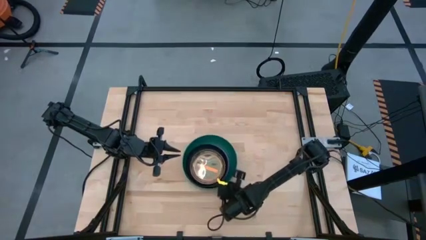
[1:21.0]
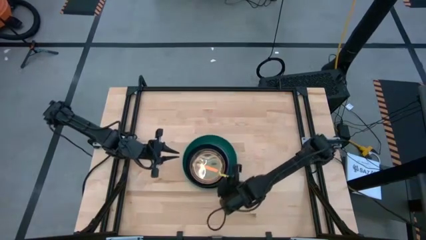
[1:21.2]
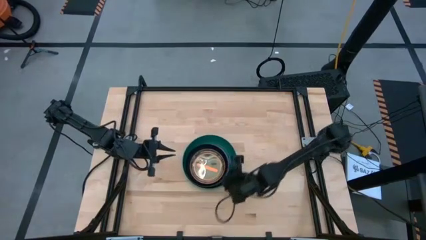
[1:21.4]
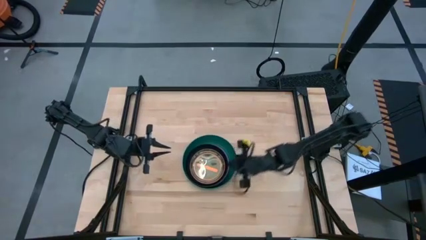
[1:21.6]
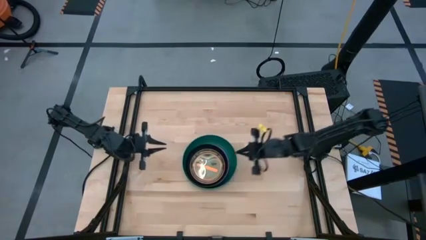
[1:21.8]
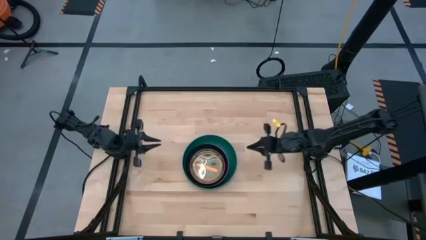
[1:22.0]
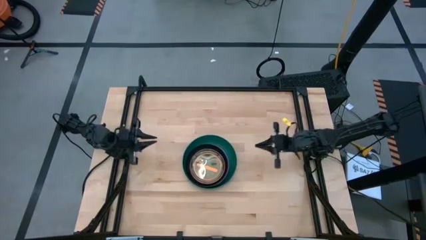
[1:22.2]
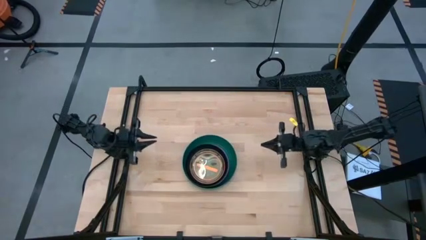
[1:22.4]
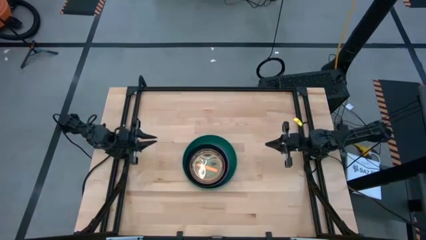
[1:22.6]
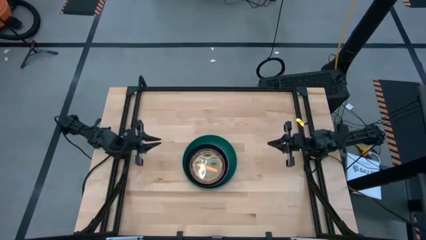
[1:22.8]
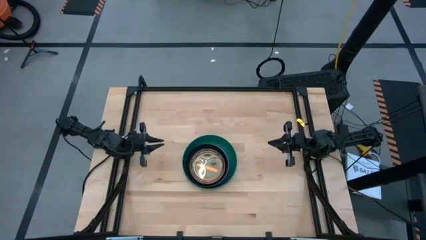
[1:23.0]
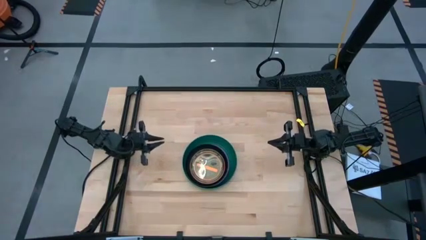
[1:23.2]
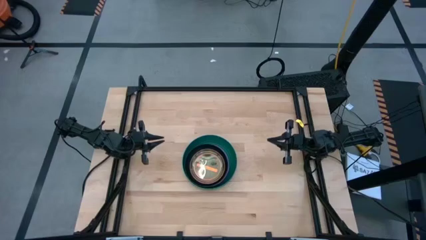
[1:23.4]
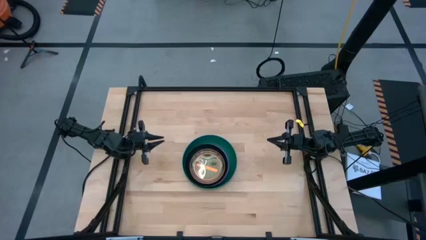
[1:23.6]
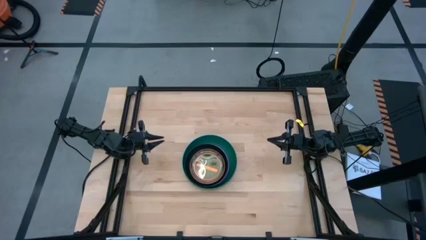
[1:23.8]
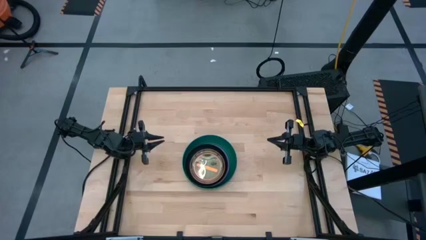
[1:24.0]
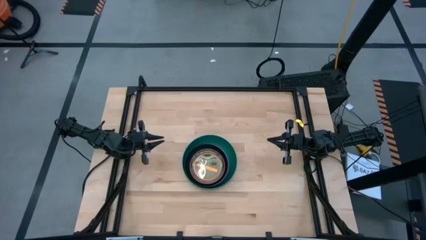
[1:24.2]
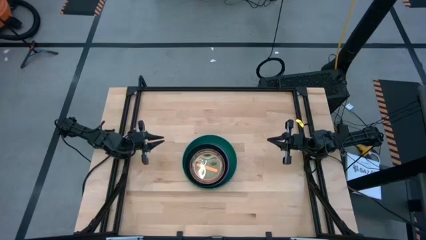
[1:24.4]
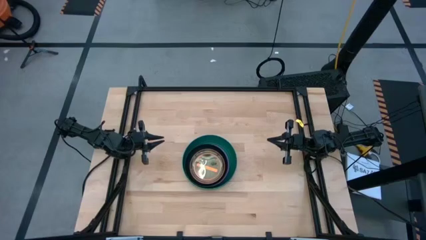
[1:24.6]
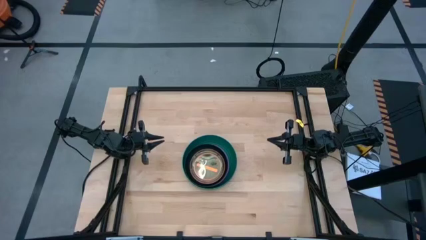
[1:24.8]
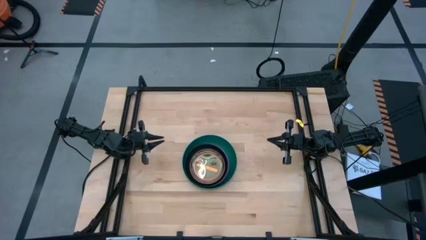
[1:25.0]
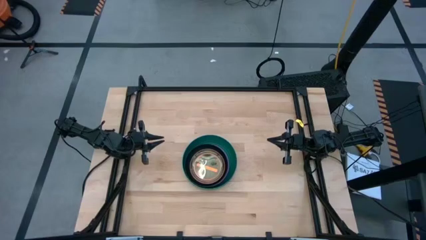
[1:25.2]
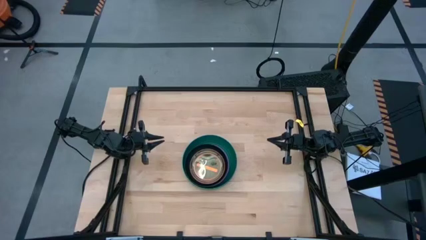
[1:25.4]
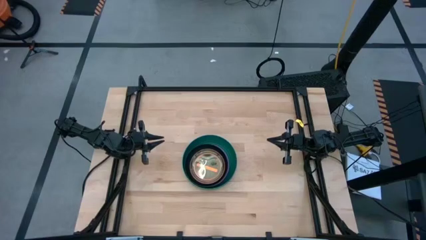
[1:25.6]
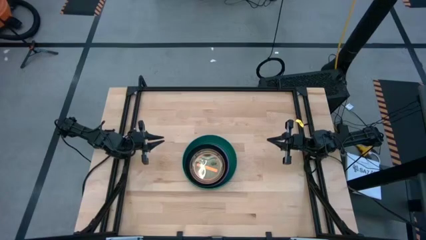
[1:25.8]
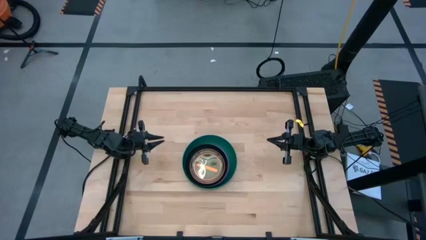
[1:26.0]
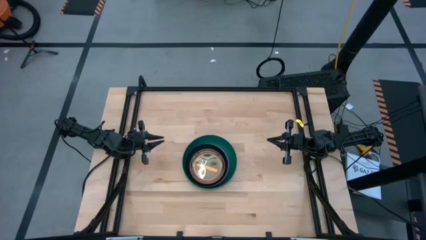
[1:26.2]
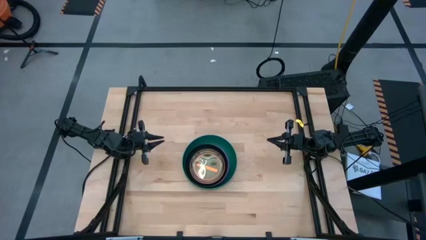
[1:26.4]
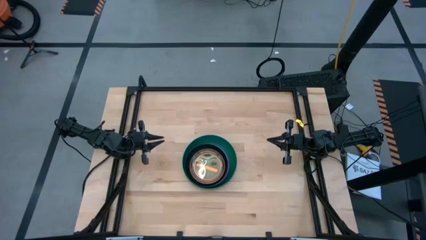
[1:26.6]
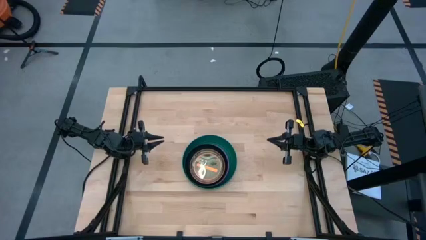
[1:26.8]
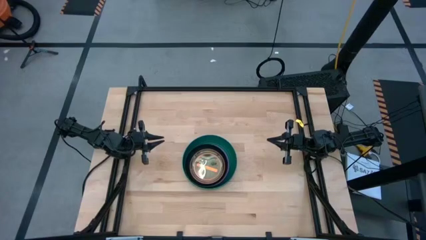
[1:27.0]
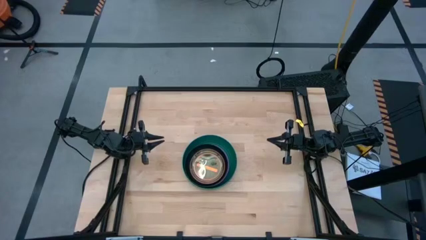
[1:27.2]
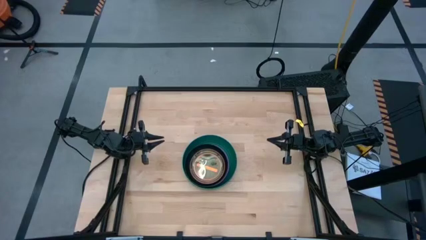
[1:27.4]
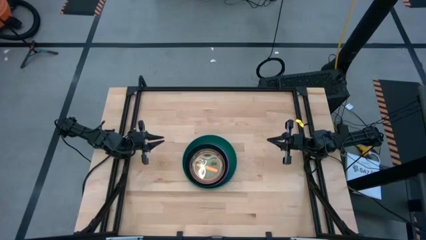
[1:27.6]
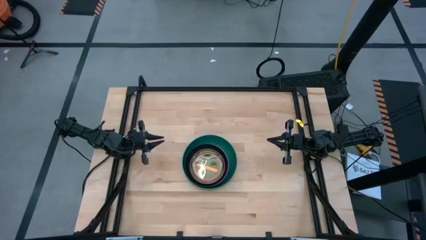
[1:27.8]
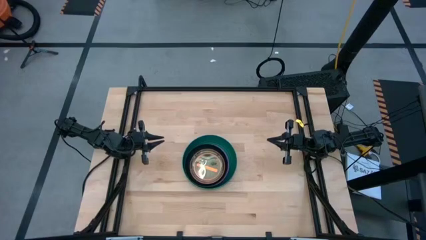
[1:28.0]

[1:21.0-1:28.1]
Task: Stack plastic plates
Return to Home Position

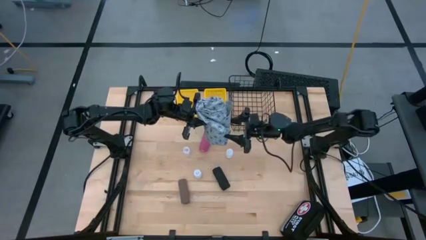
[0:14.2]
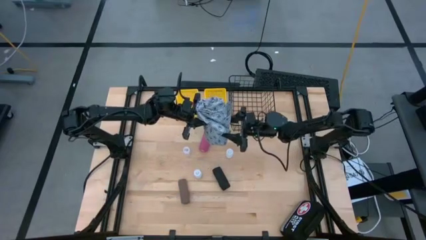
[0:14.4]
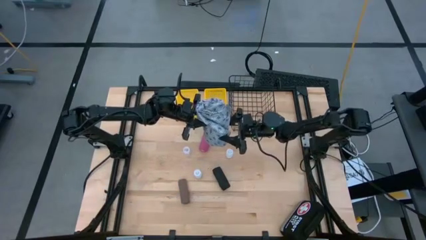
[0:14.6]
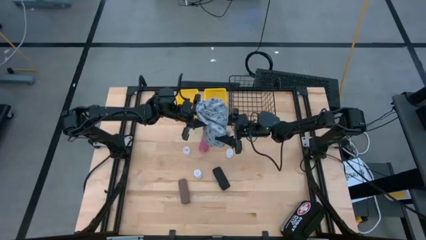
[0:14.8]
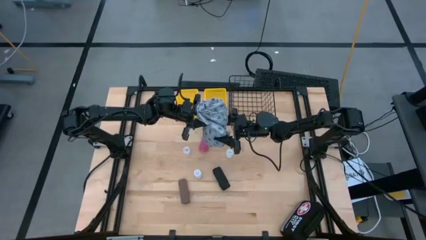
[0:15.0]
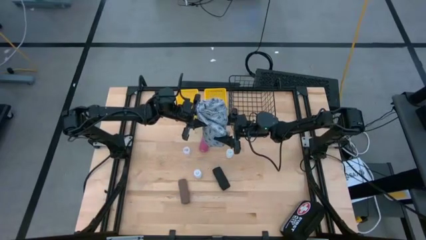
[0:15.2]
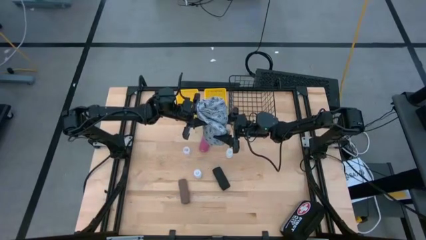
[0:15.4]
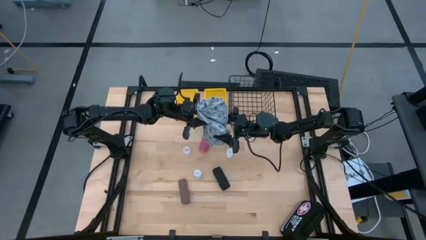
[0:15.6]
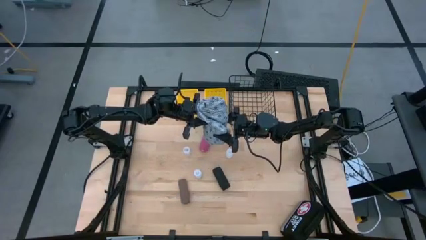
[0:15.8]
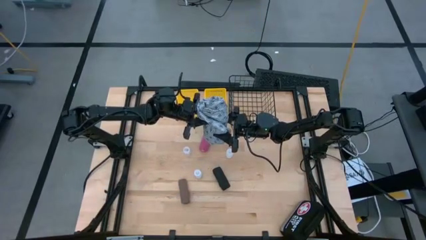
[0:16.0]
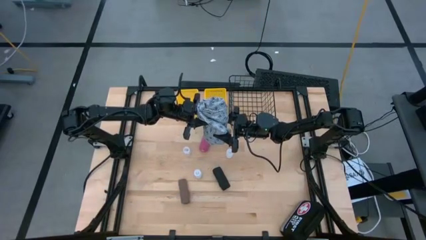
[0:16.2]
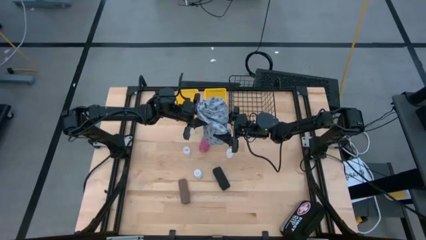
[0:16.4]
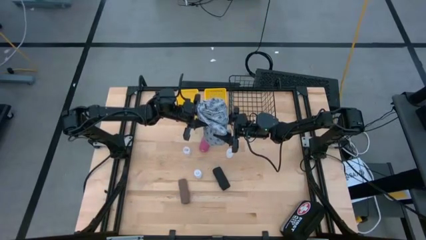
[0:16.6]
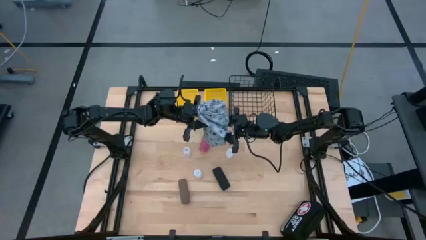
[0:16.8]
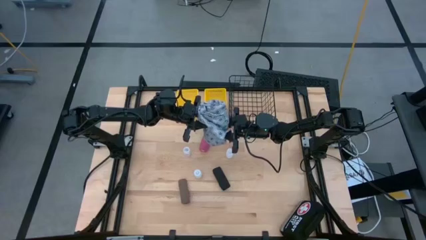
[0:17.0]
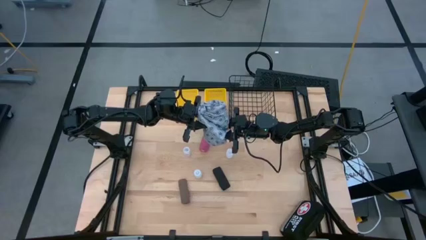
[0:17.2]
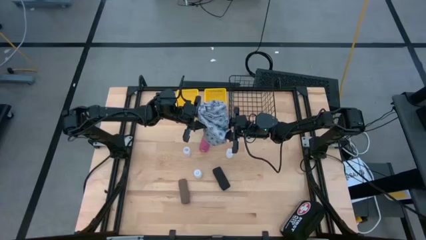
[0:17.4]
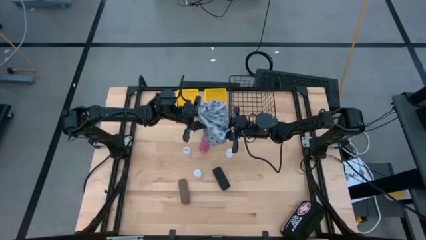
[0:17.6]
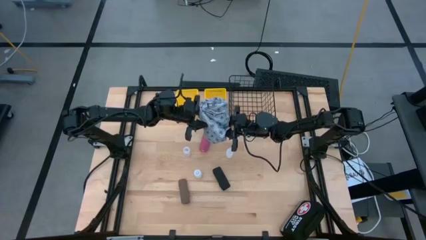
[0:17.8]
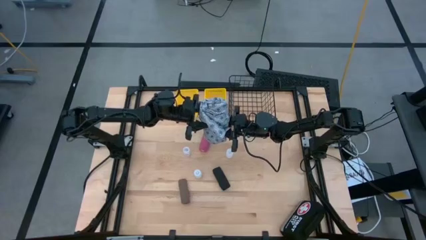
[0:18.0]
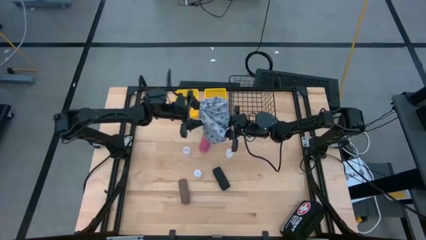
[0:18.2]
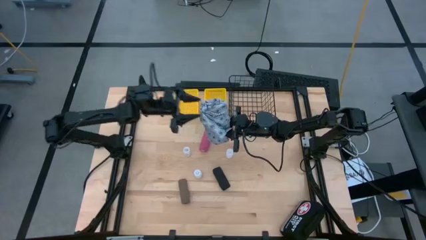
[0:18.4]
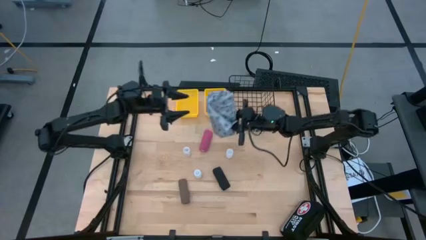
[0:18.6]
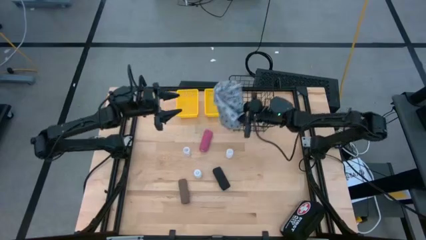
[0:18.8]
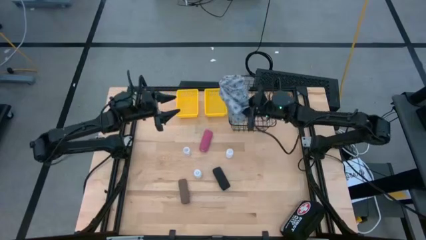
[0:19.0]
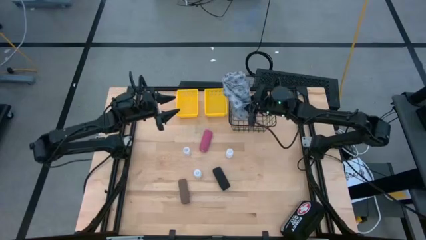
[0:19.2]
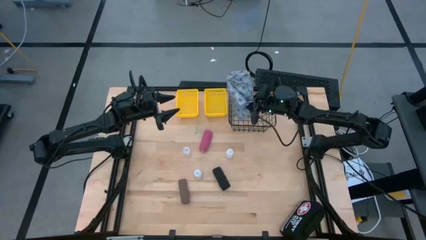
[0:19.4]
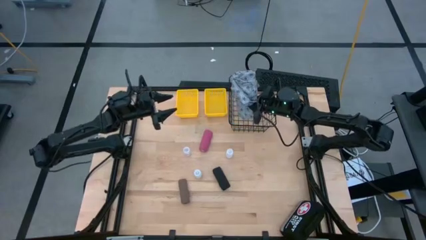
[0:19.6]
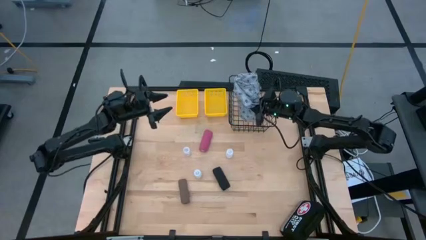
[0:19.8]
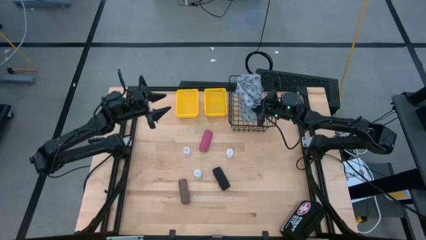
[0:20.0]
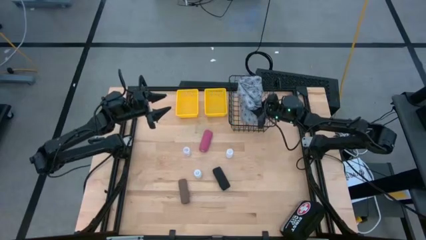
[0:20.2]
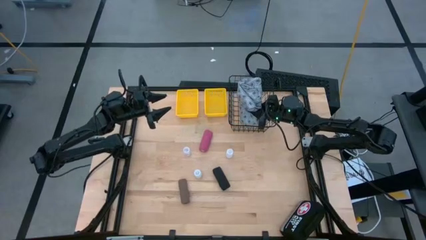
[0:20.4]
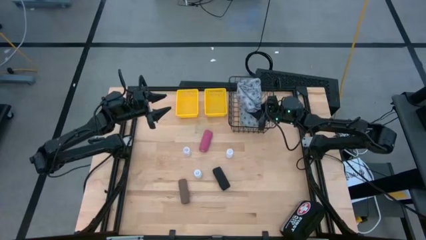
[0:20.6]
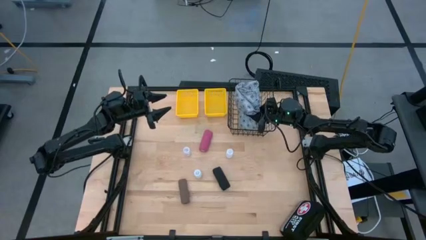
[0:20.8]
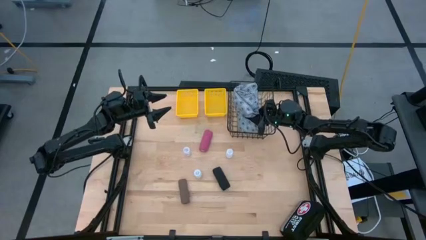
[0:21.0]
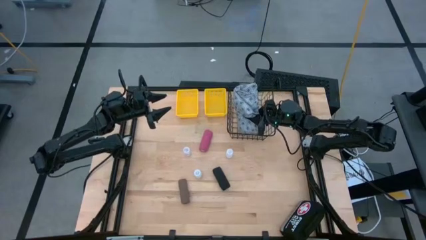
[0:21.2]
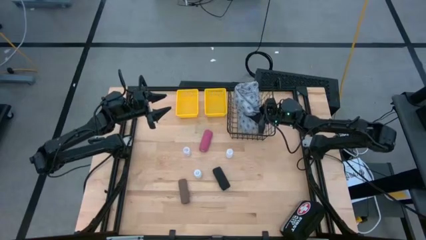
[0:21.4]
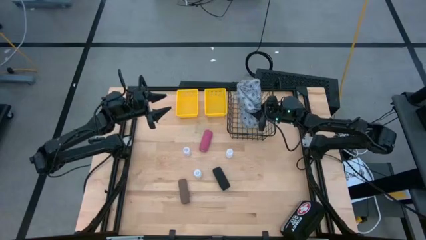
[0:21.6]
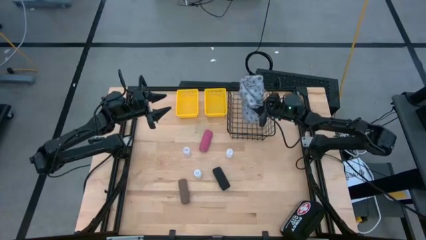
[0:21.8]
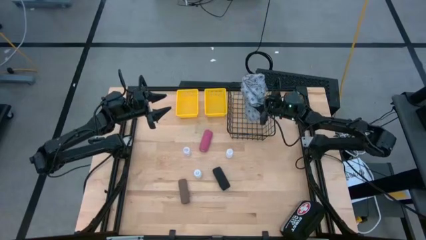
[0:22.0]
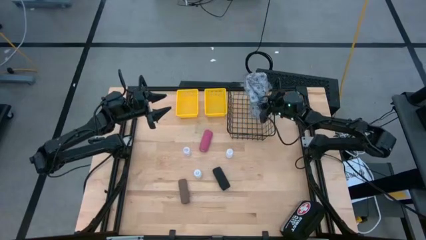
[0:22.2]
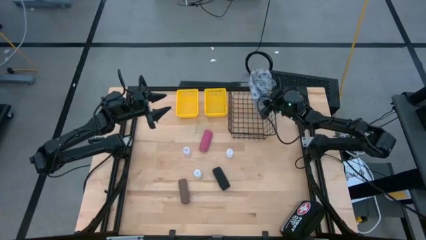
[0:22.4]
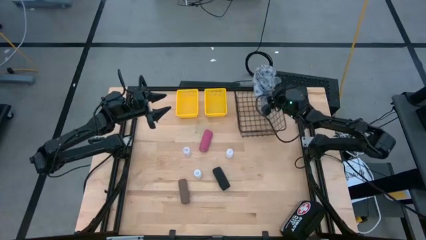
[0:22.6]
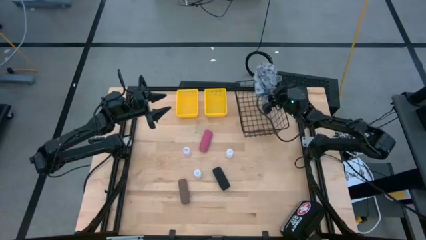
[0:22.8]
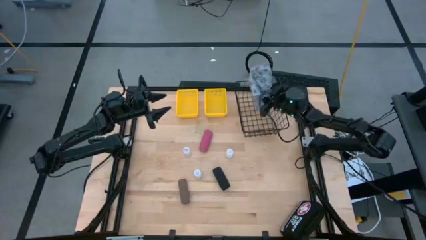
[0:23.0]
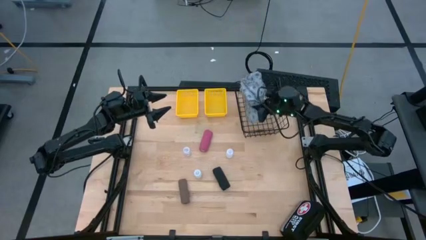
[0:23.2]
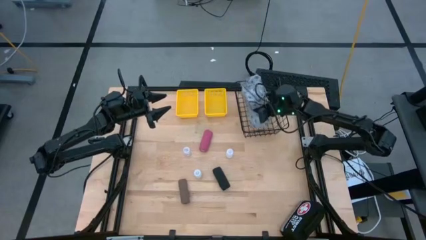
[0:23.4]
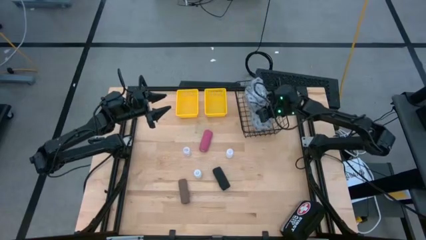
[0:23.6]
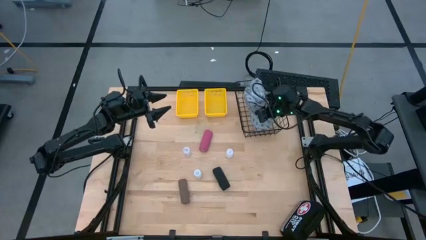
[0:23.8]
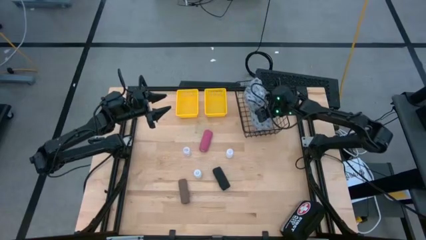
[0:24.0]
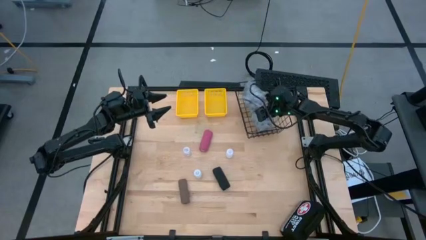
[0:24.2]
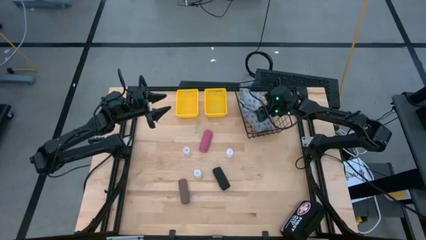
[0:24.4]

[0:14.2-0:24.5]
Task: Pick & Place Medicine items
Put the gray patient gown into the black wire basket
